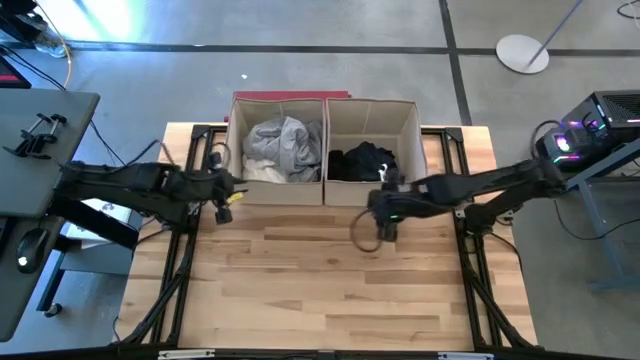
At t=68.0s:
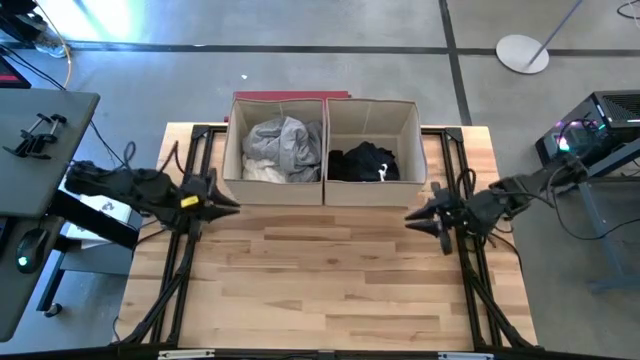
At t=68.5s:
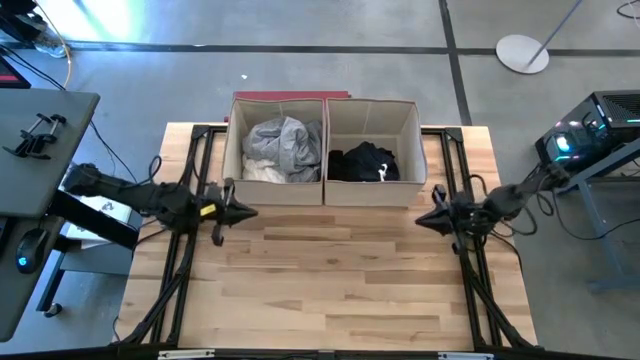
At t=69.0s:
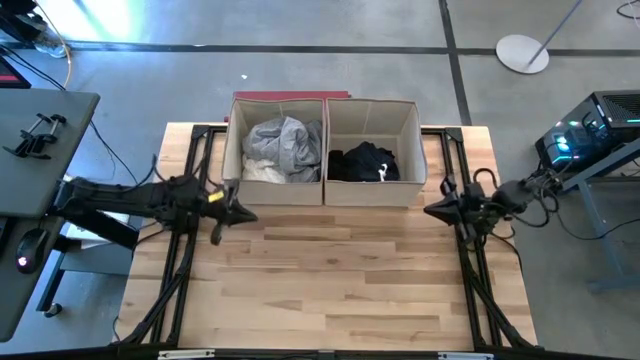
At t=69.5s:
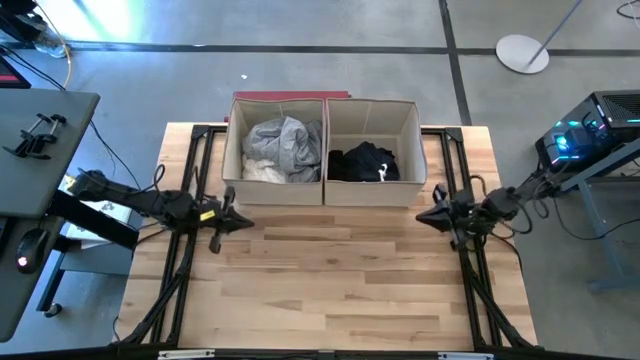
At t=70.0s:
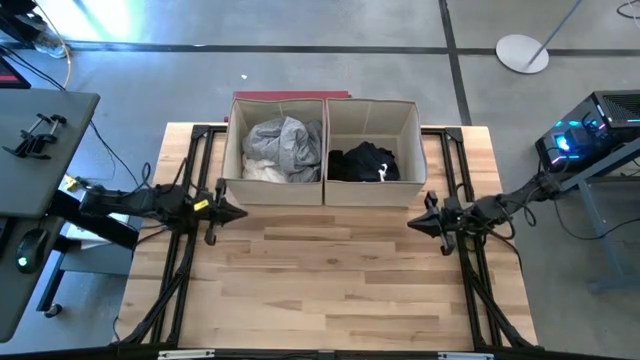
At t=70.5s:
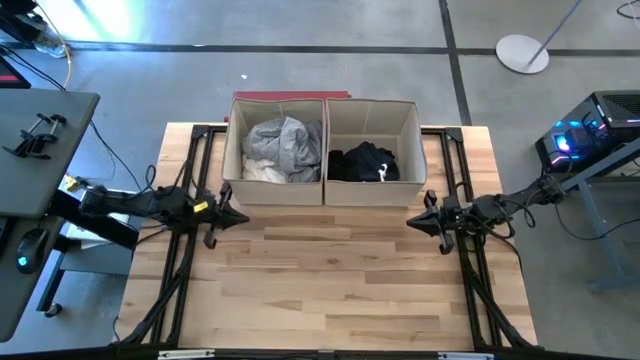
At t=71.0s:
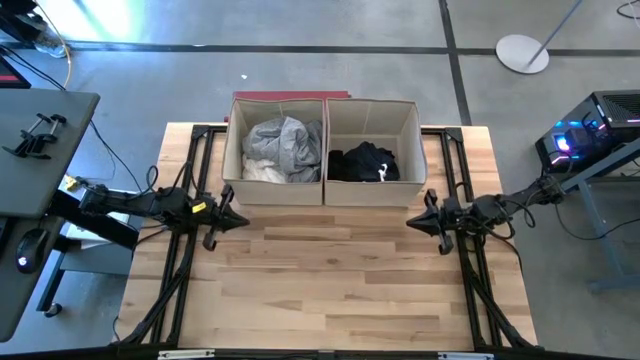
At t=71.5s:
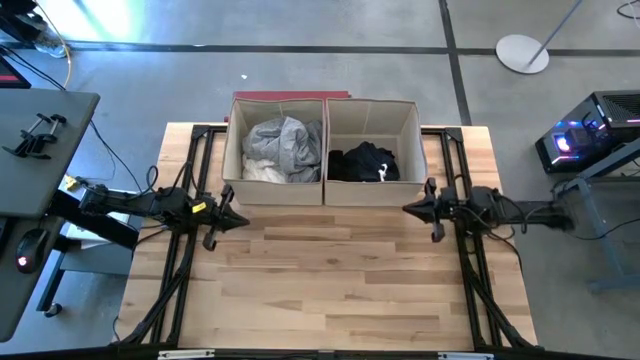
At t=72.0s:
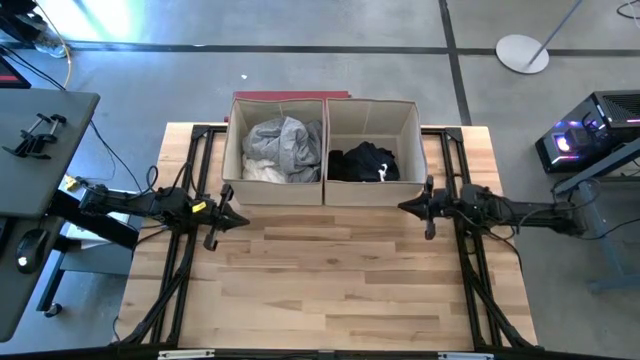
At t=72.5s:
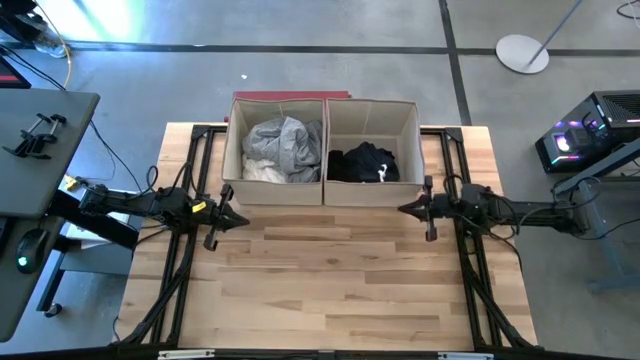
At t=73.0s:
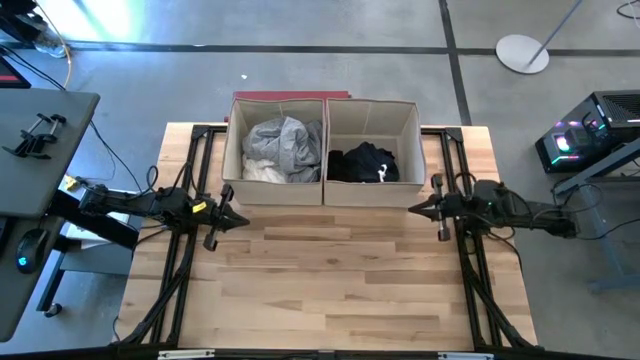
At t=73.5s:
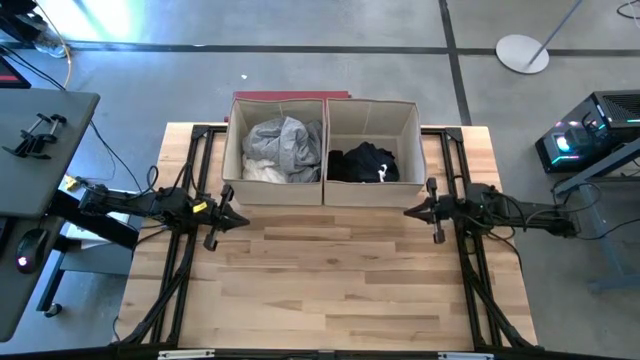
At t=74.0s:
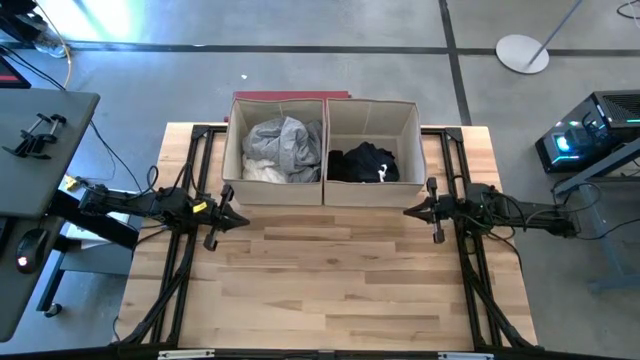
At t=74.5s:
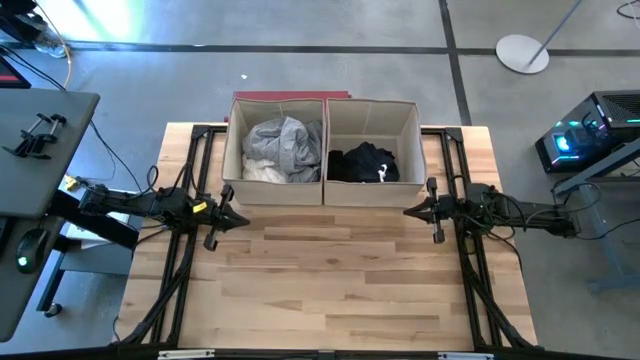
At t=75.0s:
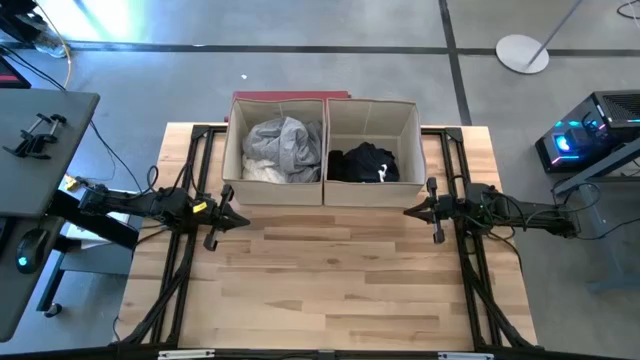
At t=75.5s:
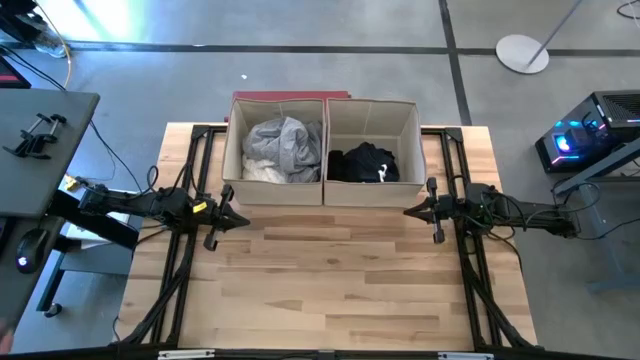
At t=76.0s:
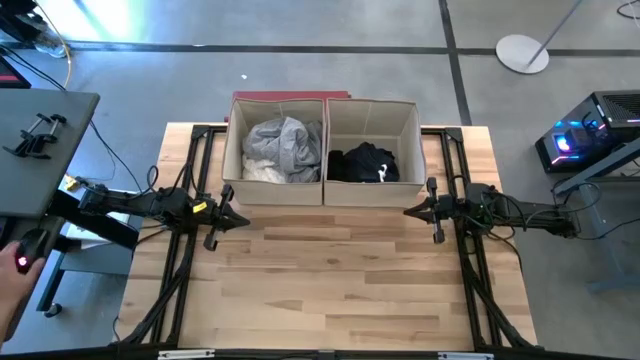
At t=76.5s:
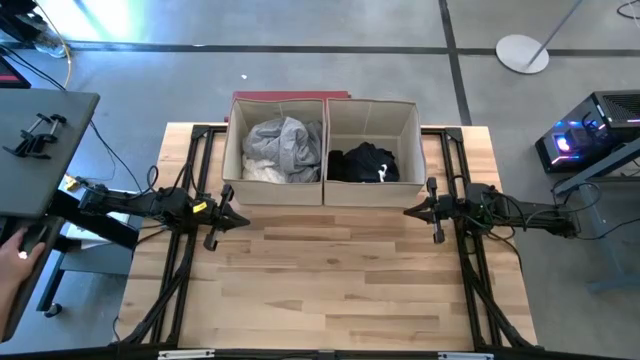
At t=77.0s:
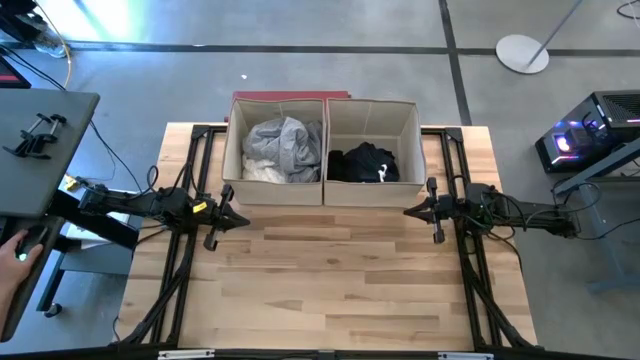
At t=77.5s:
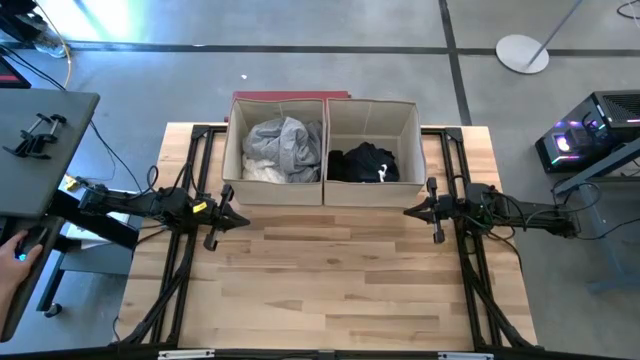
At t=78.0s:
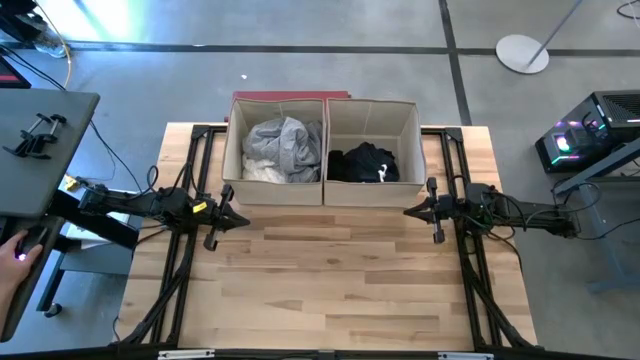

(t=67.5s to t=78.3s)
Return to Home Position

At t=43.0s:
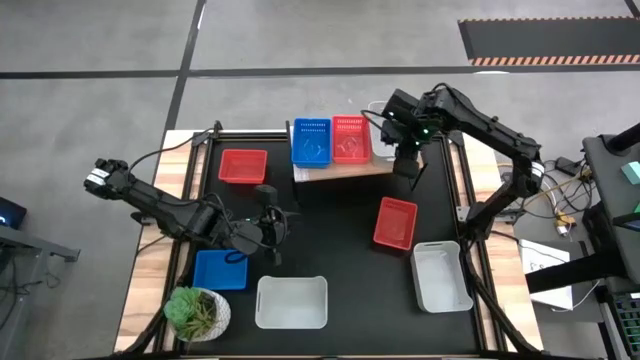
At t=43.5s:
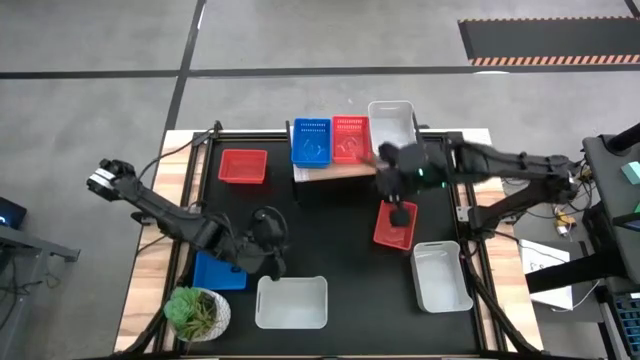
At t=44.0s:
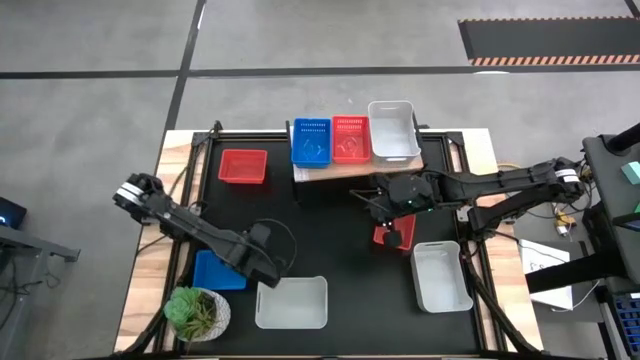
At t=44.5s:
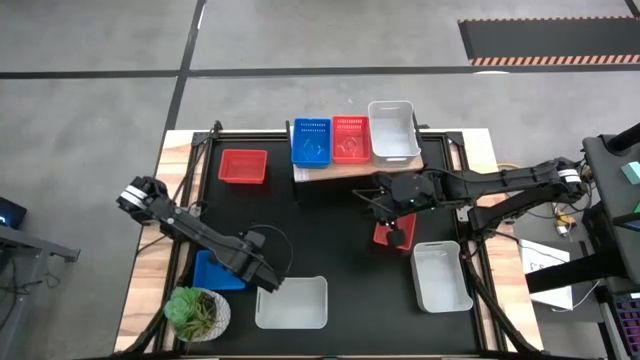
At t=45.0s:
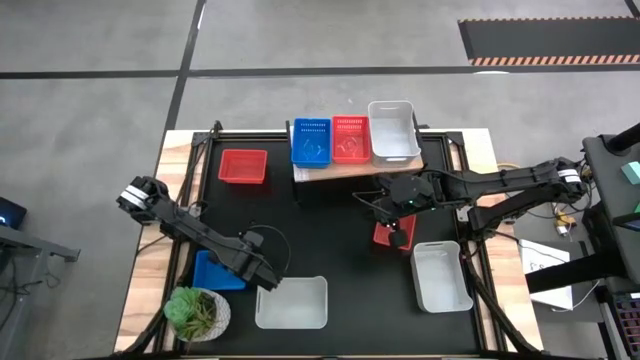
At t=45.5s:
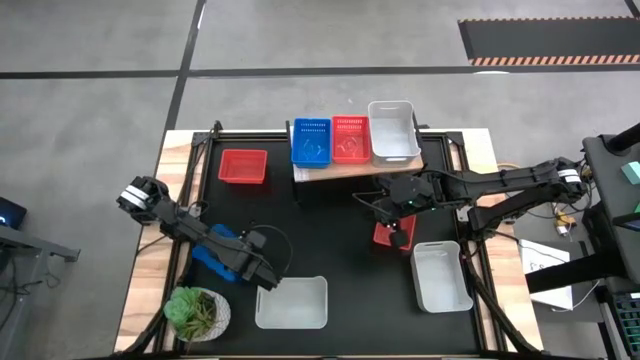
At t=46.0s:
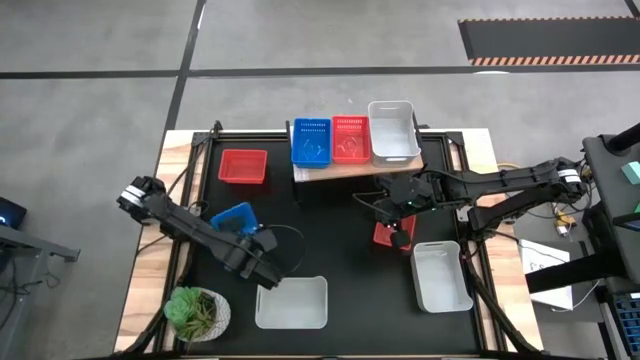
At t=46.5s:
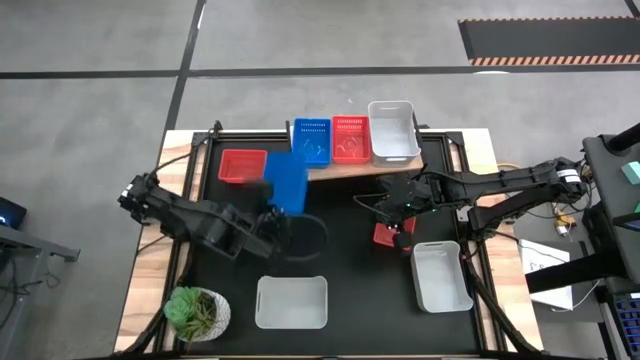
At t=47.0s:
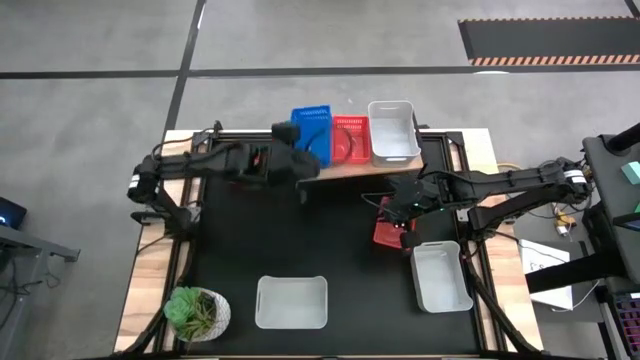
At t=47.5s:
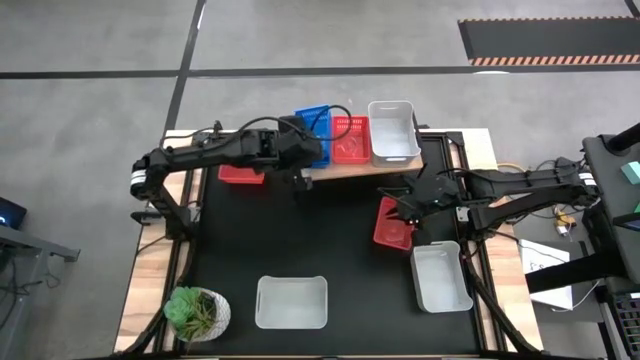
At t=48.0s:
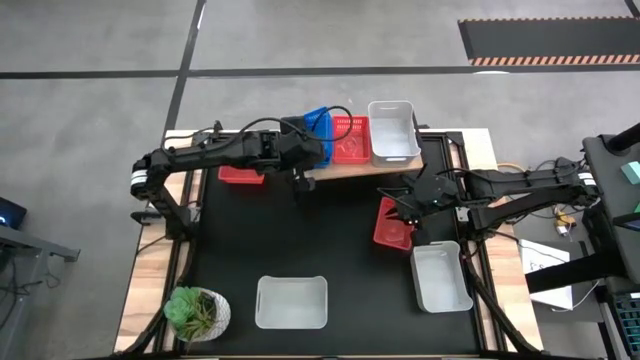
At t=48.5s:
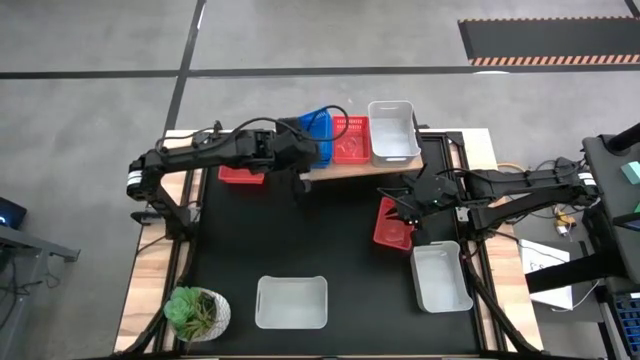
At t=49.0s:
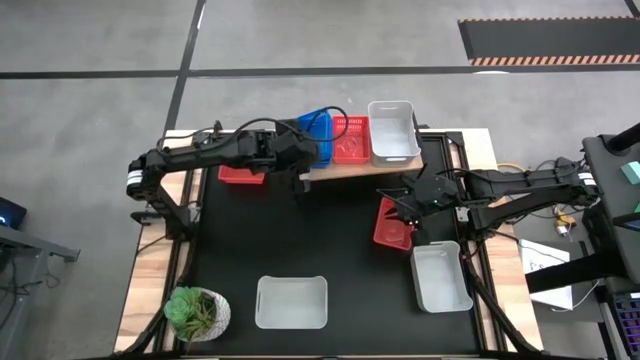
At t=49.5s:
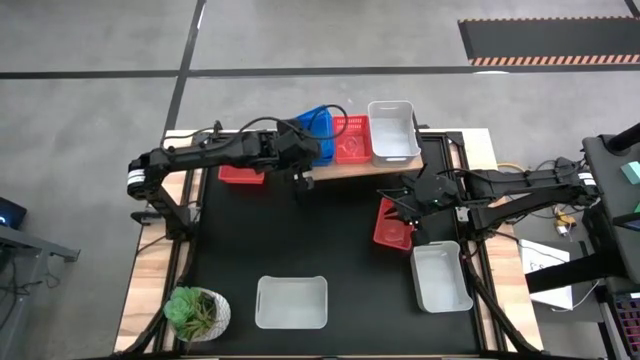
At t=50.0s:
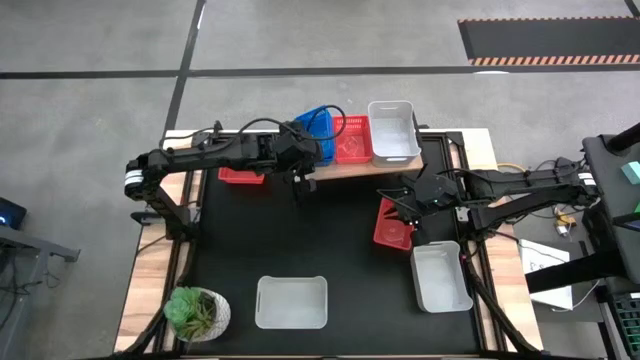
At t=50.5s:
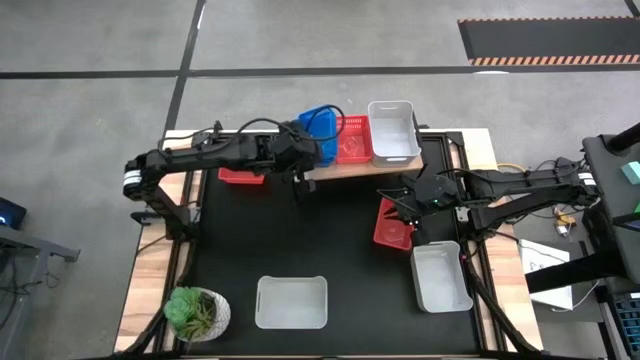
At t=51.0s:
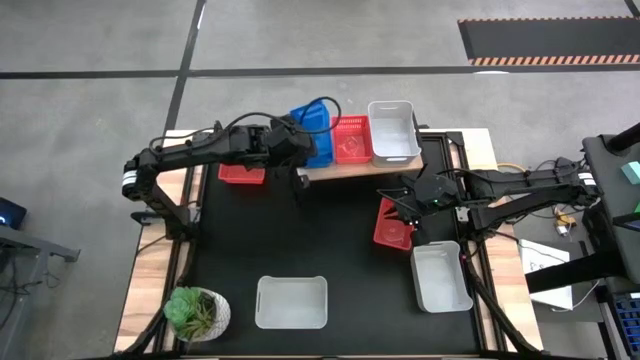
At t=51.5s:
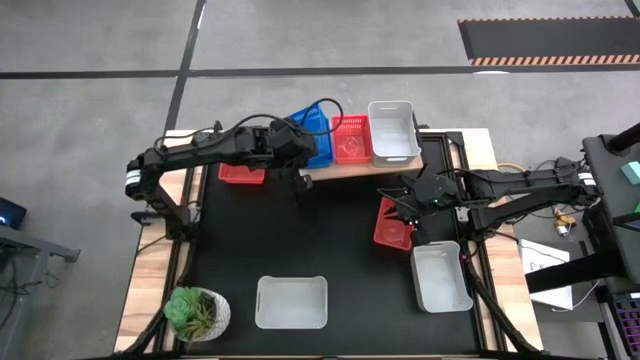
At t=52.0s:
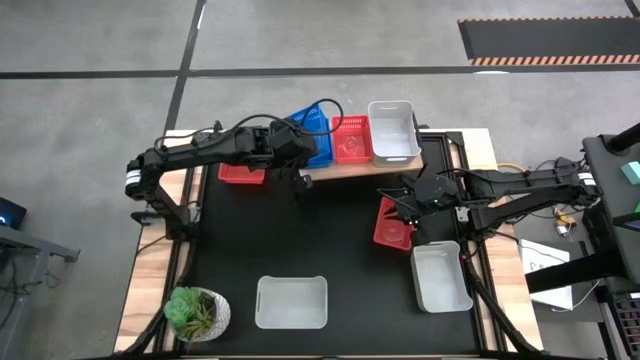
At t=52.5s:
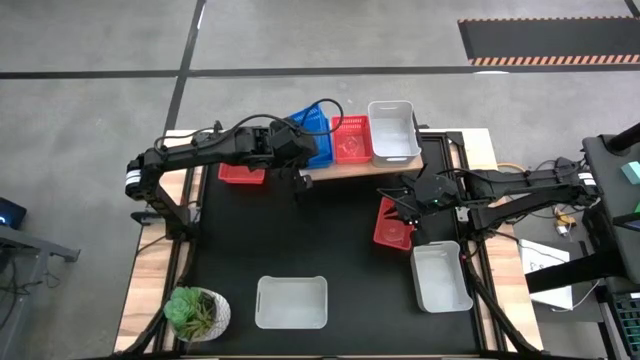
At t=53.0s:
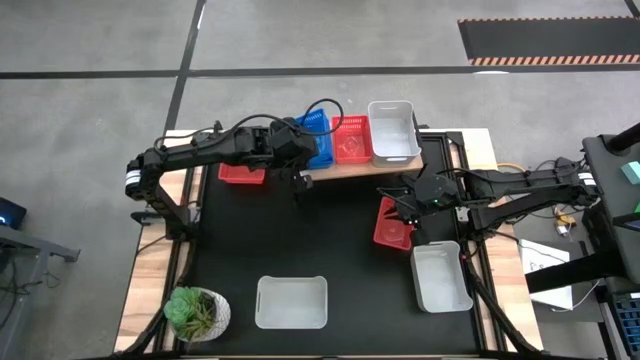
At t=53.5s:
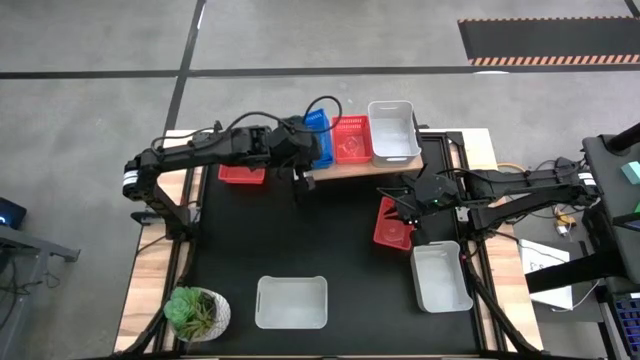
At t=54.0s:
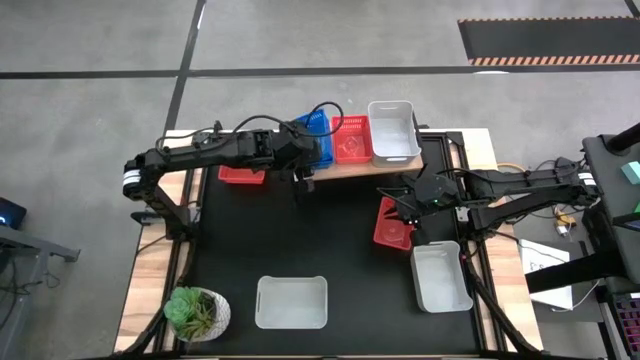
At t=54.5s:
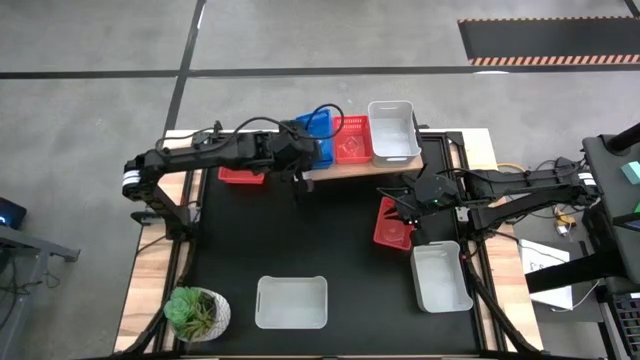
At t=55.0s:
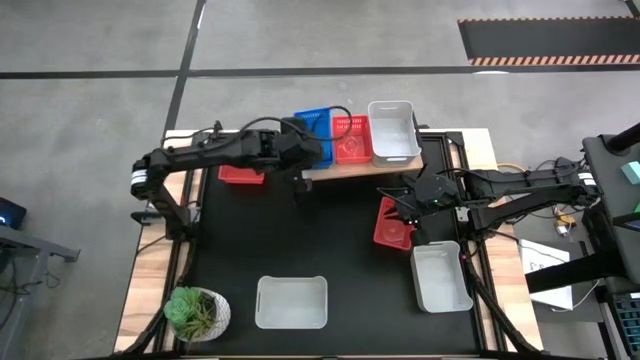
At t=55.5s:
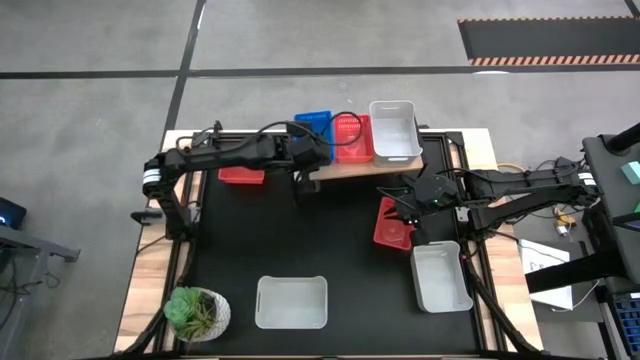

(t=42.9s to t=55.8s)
Stack the blue basket on the stacked blue basket on the shelf
